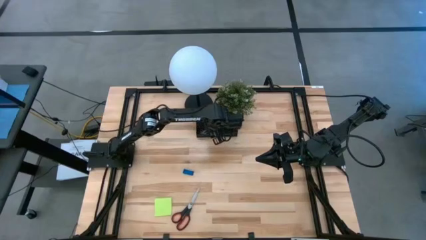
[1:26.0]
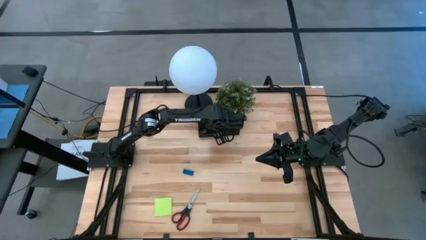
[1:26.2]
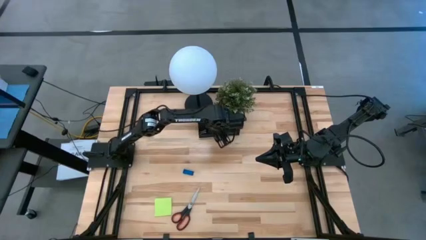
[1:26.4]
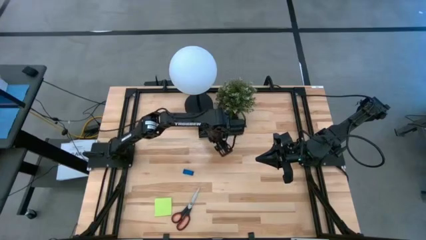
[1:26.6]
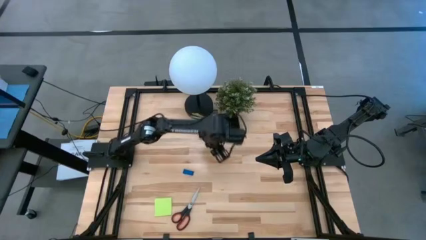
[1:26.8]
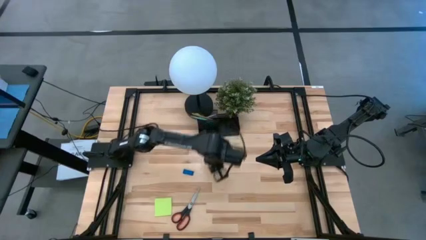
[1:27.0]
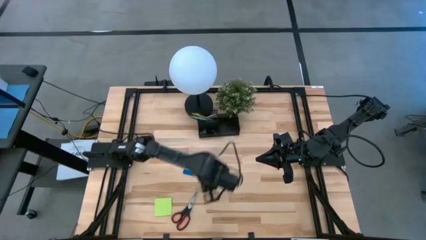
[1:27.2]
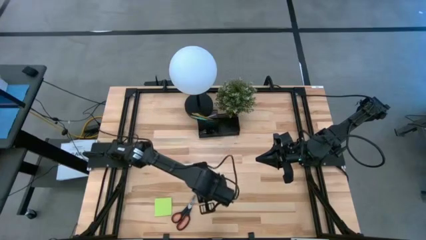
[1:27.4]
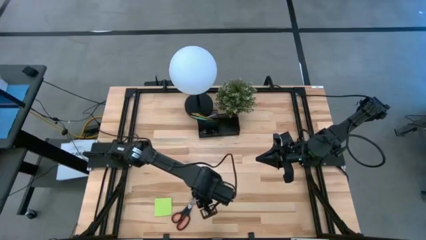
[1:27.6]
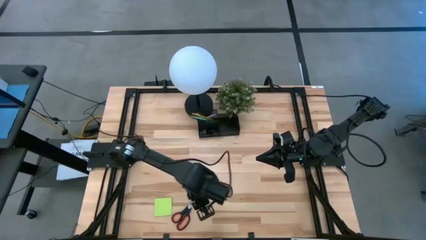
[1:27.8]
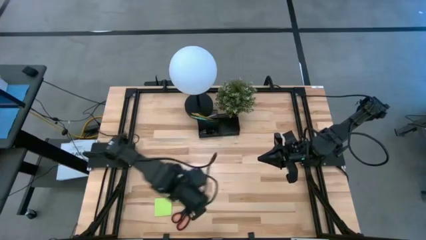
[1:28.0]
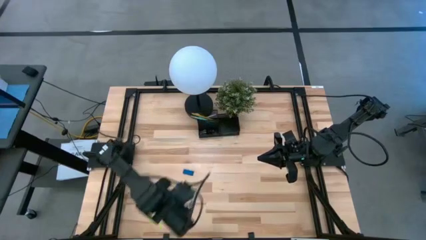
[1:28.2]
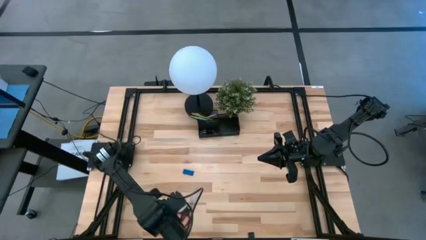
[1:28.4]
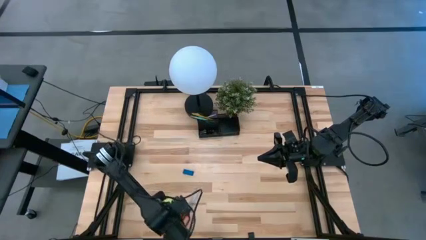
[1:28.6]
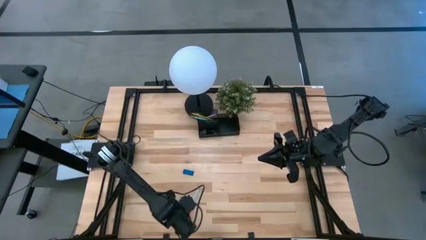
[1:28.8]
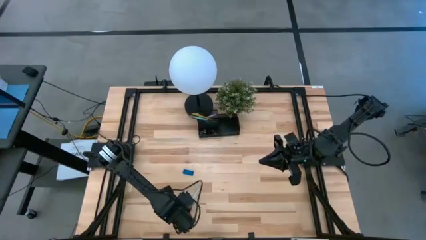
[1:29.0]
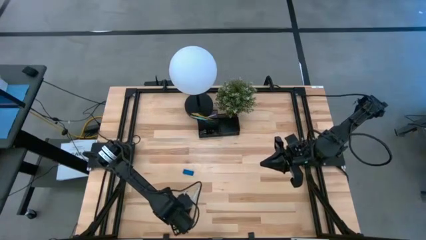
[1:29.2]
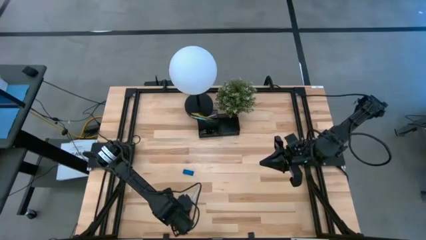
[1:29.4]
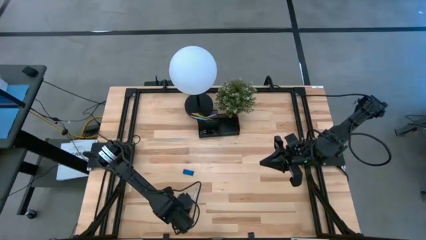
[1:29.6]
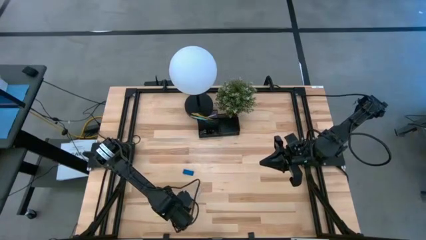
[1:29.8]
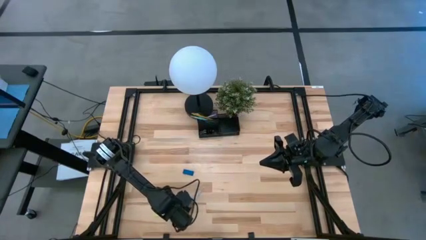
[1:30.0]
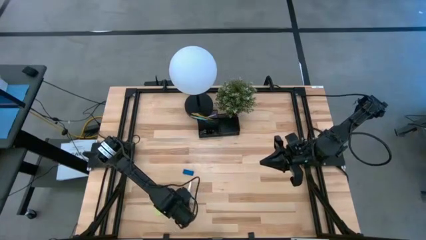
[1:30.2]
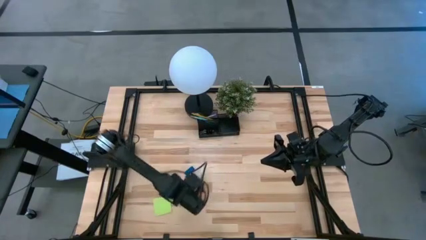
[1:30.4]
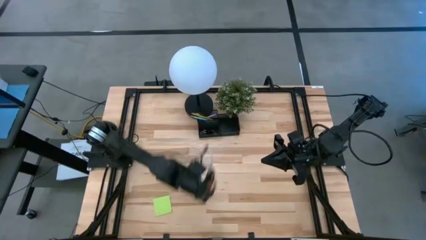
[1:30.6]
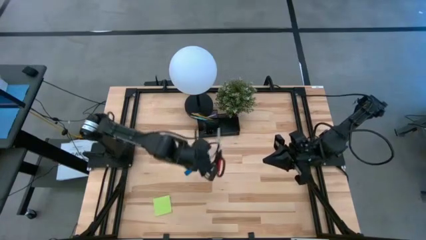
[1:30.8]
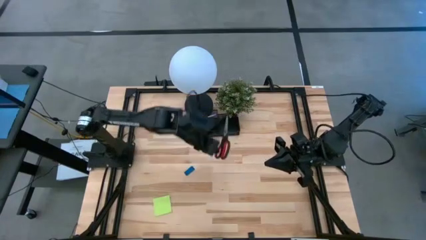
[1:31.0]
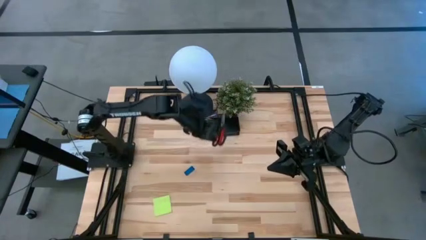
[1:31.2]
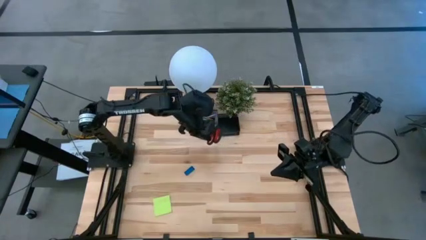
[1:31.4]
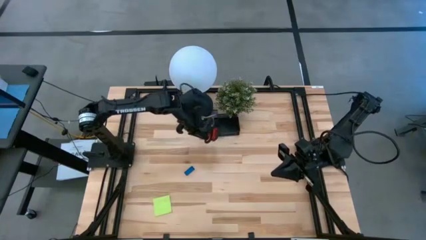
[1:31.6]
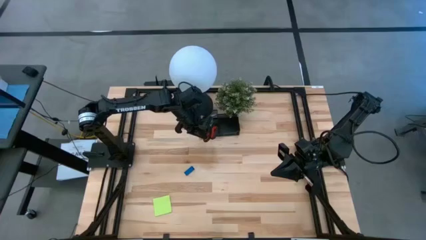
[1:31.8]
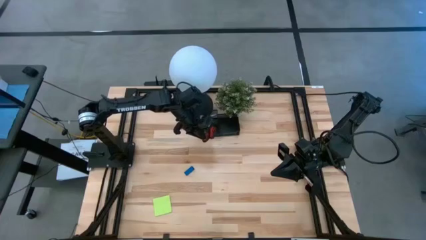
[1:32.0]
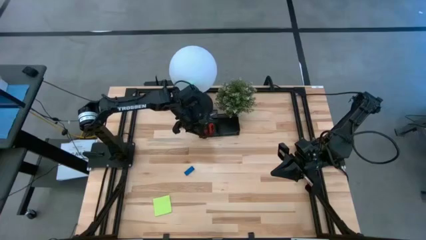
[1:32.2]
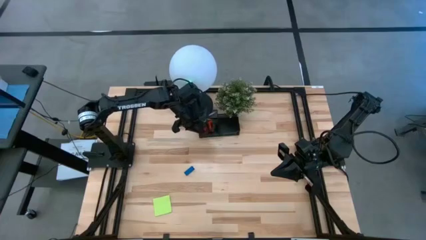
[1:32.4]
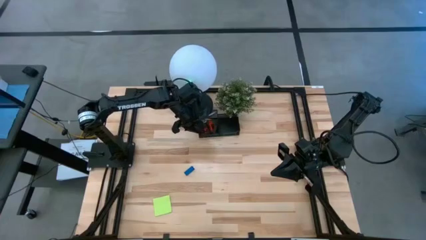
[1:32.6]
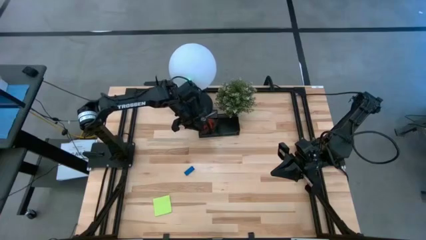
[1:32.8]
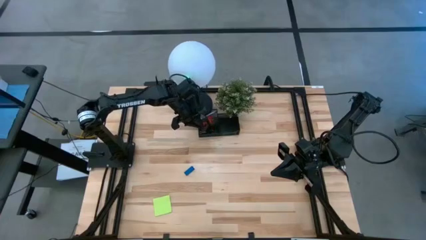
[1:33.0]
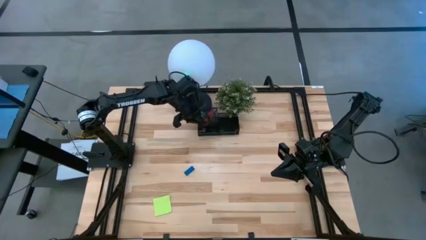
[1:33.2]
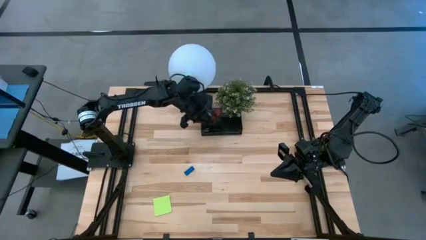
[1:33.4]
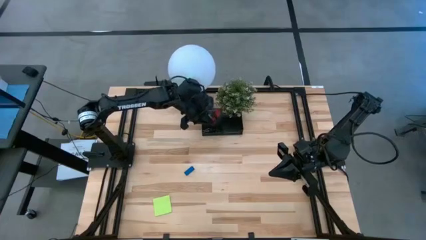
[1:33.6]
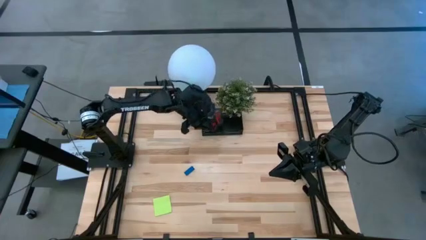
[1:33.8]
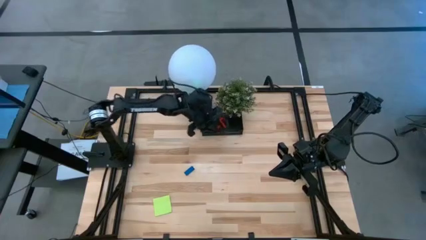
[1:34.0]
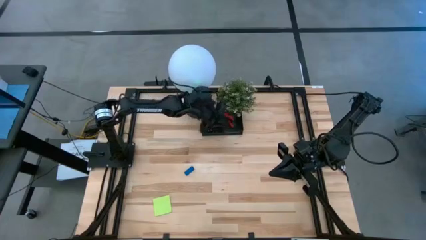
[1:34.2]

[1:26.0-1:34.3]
Task: Pick and place office supplies into organizer
Put the black scissors into the black desk organizer

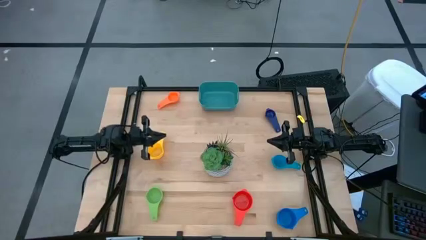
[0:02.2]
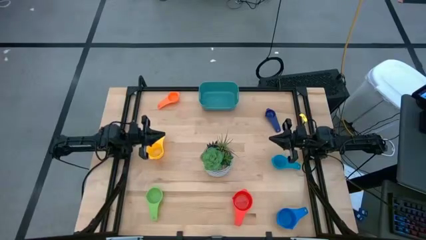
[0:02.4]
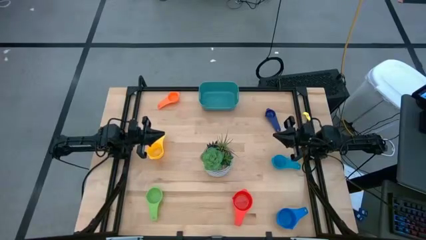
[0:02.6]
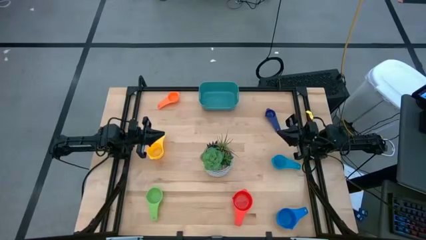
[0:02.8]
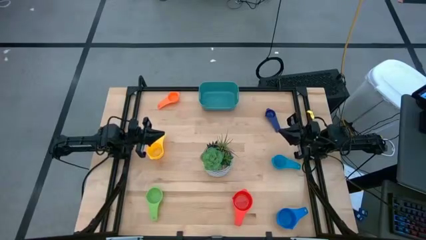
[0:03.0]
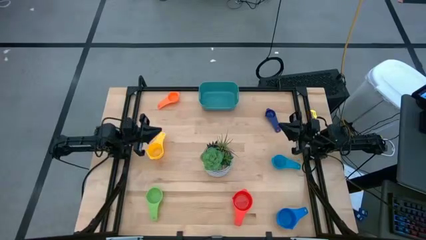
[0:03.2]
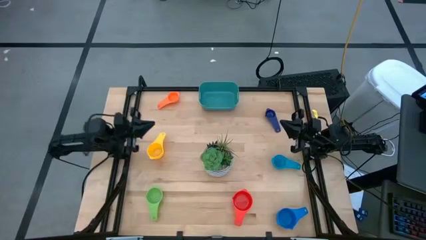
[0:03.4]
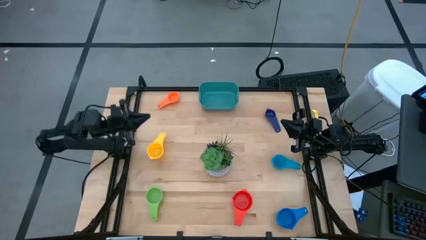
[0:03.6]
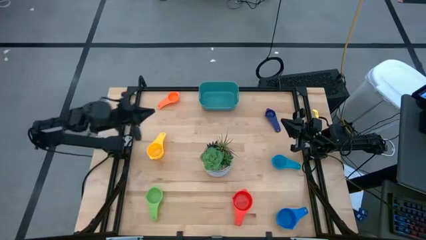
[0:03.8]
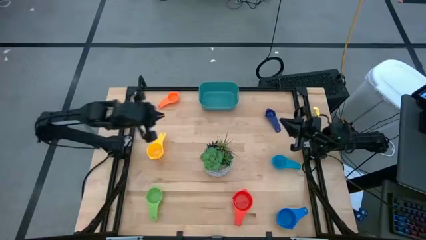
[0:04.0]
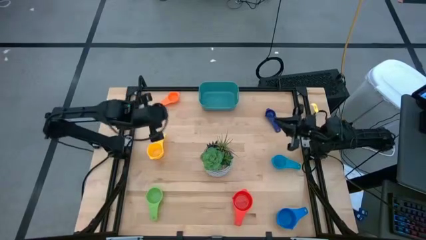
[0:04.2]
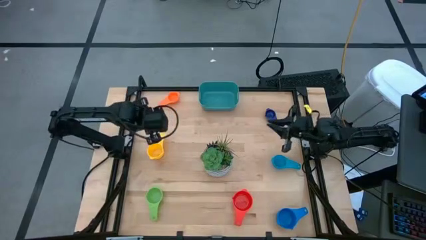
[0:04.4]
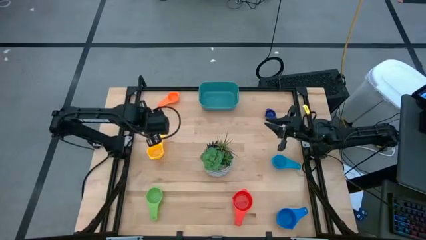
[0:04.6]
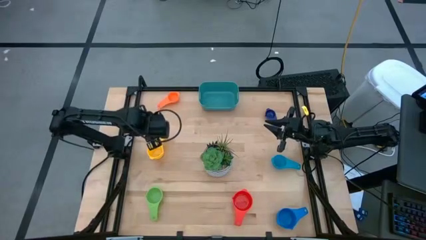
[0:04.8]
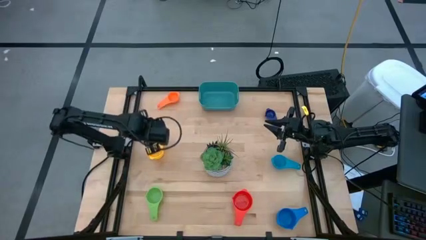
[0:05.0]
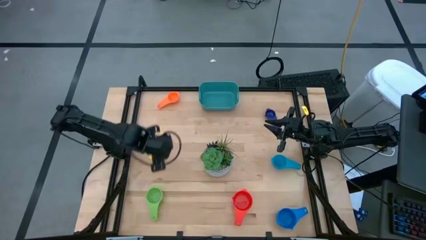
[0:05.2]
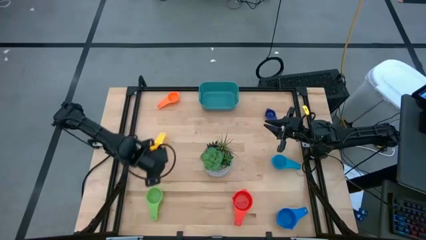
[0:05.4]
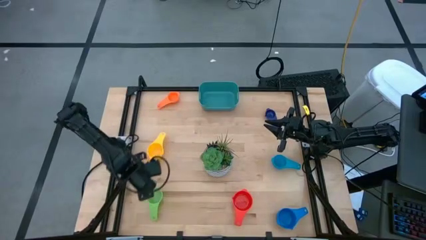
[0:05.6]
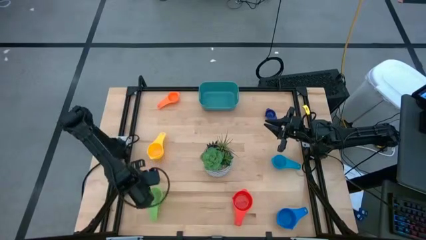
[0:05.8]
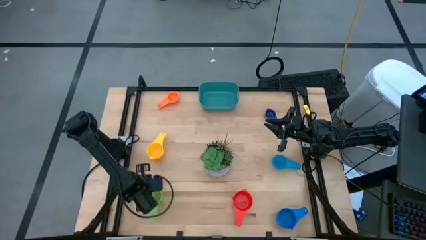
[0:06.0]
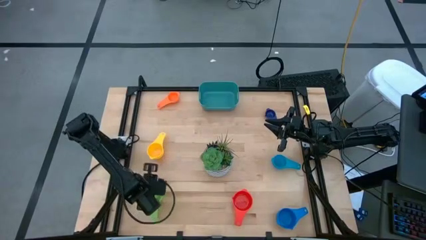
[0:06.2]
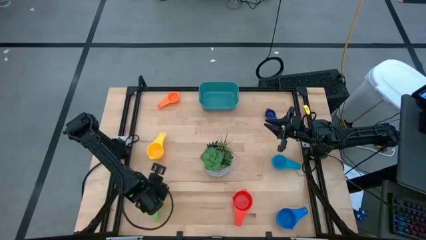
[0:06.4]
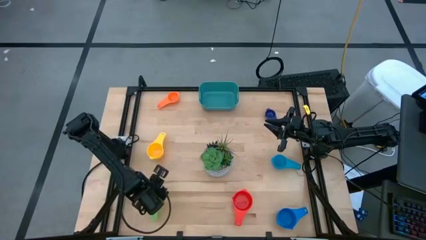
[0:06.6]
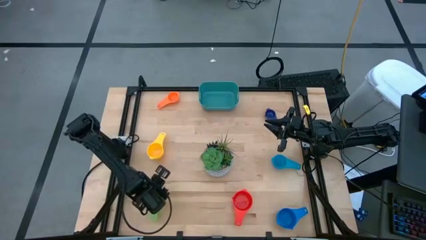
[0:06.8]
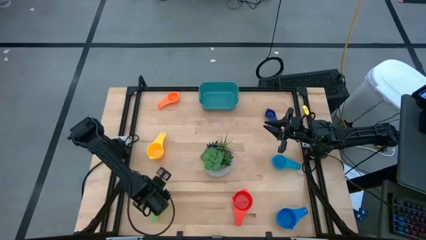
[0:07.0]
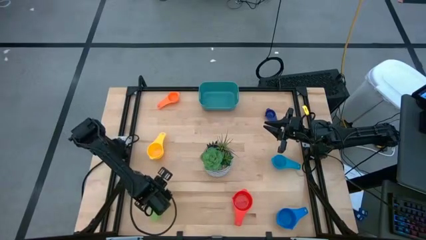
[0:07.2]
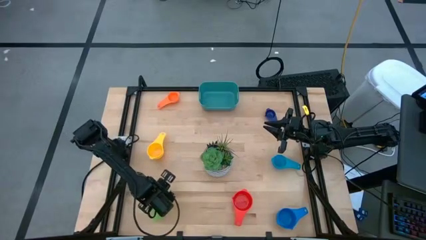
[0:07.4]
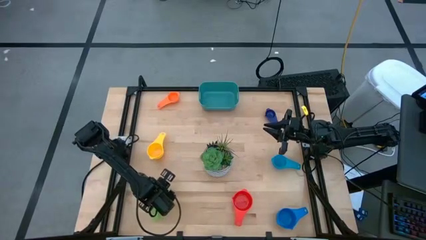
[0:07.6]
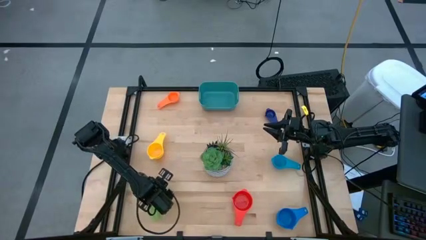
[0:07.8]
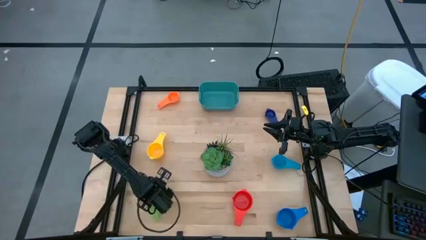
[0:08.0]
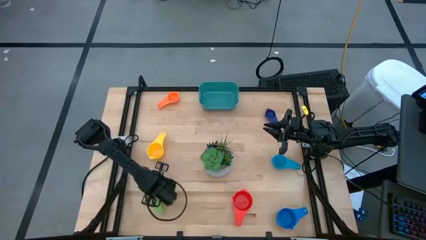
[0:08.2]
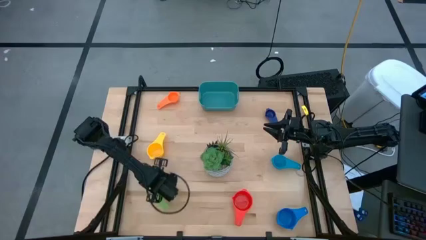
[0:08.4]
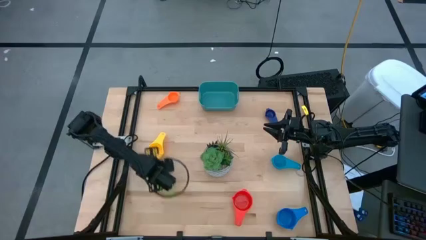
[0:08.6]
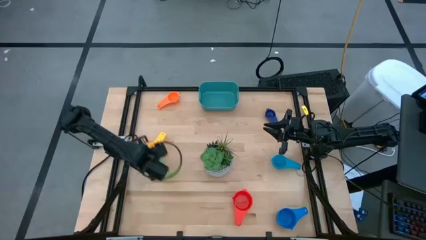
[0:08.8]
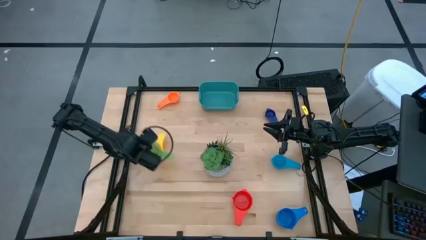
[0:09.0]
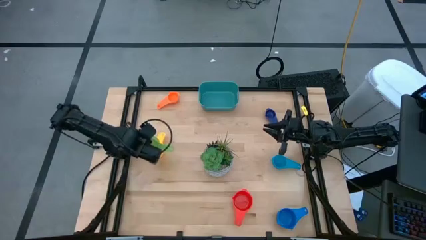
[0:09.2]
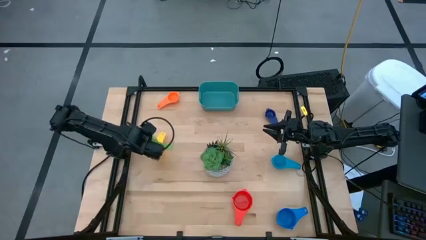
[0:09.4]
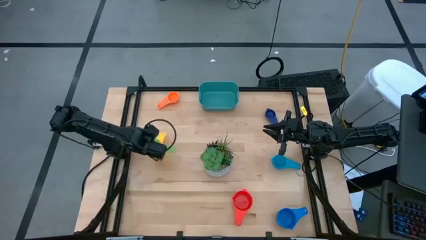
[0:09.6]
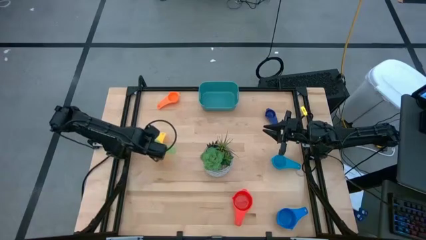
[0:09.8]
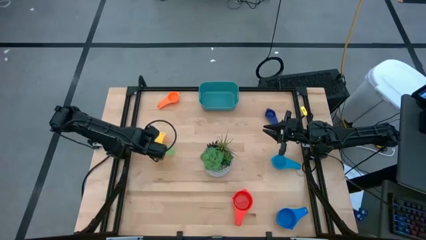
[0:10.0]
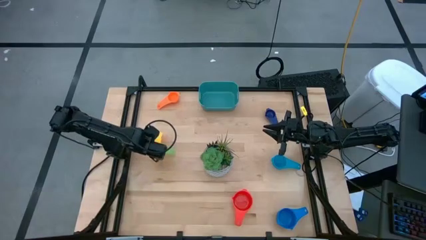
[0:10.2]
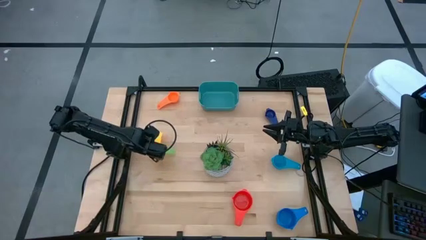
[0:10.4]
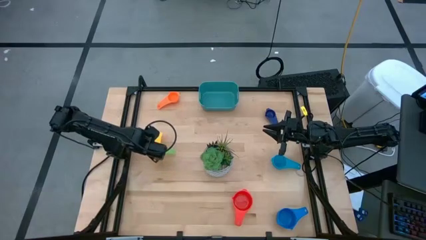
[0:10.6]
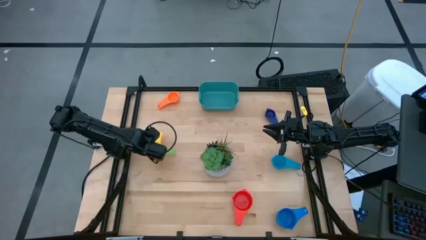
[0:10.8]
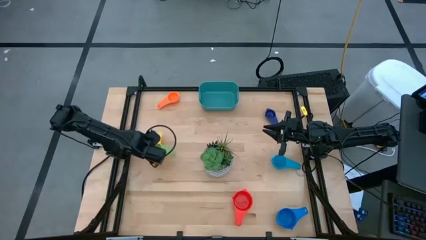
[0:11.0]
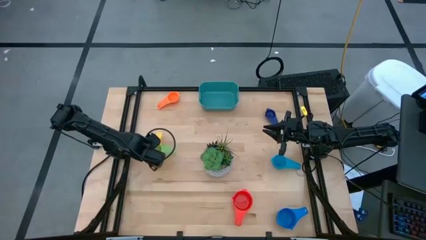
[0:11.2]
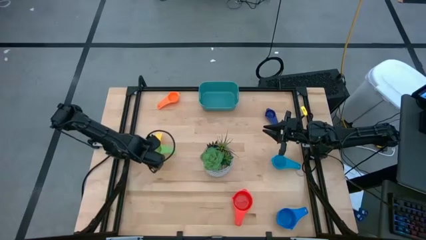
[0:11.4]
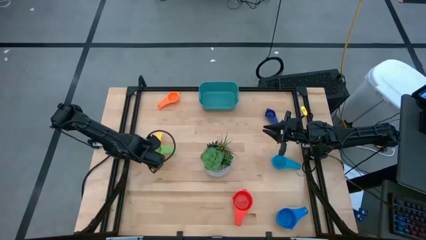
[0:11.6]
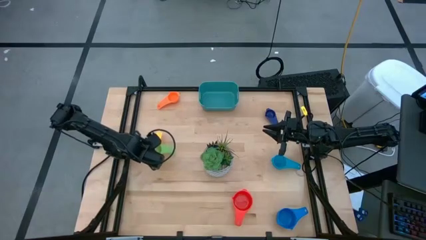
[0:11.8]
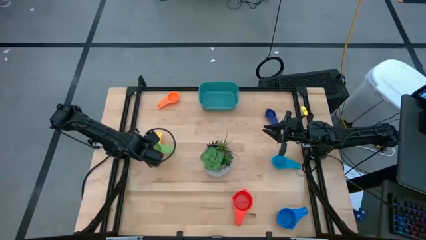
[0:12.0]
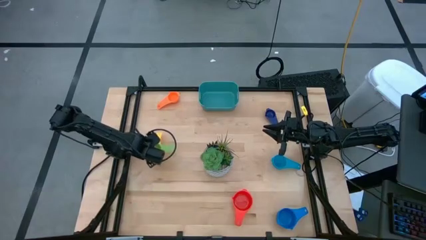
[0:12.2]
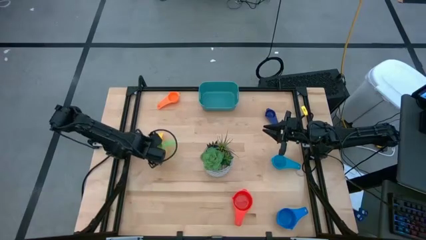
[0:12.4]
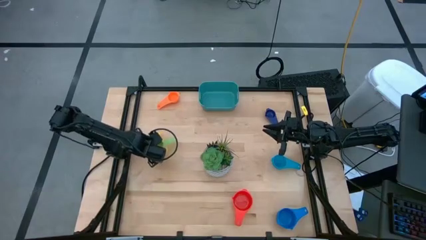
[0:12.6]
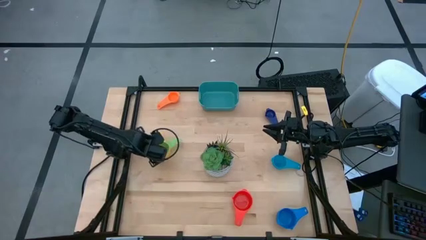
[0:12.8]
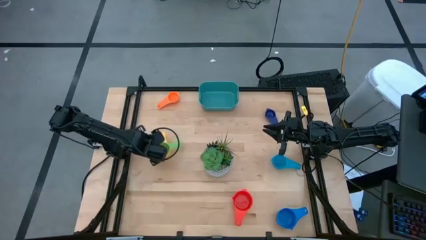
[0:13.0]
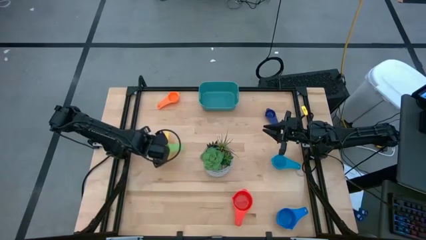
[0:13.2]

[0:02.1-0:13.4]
Task: Nest measuring cups in basket
Stack the green measuring cup on top the yellow measuring cup
